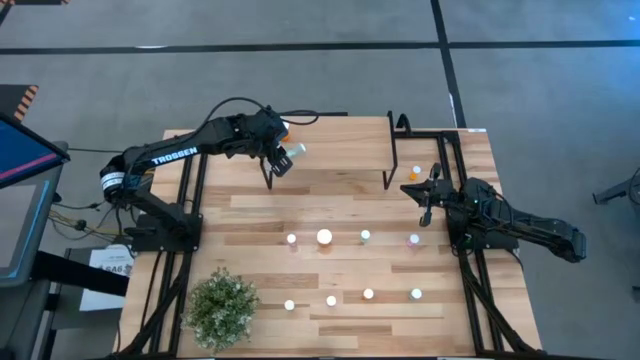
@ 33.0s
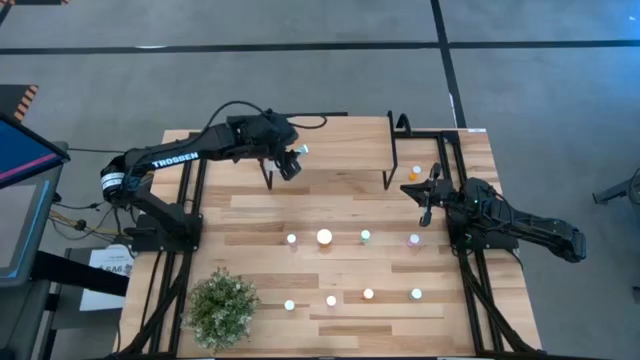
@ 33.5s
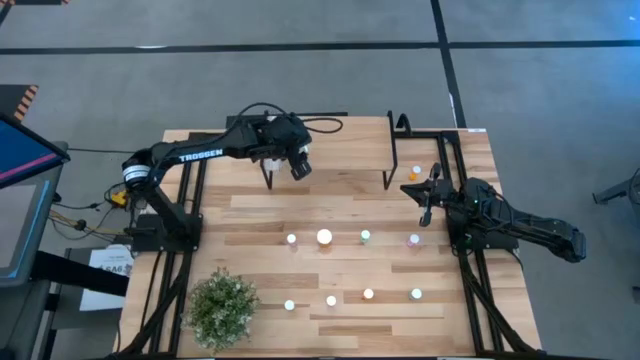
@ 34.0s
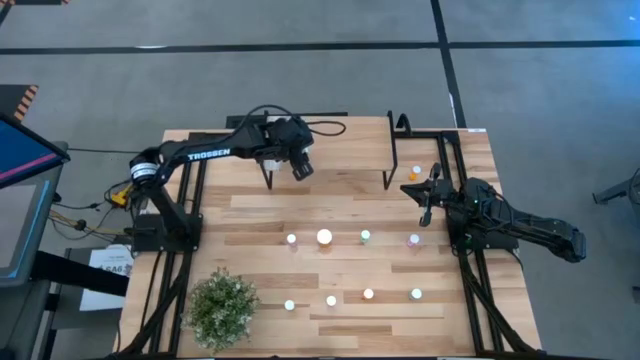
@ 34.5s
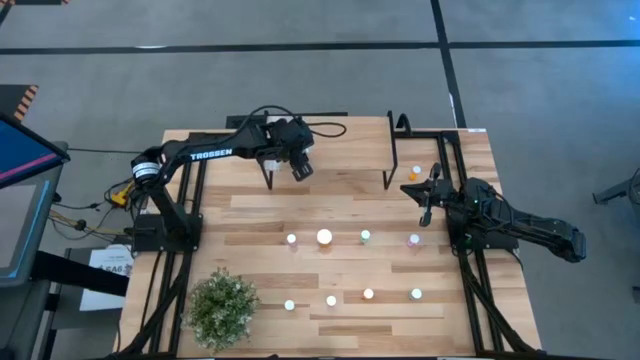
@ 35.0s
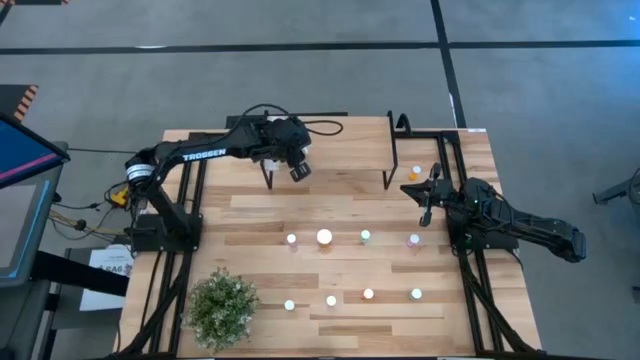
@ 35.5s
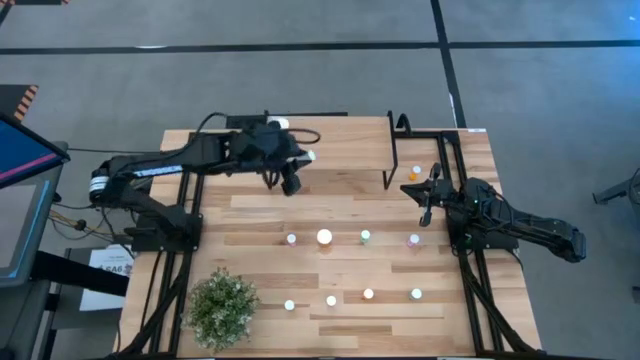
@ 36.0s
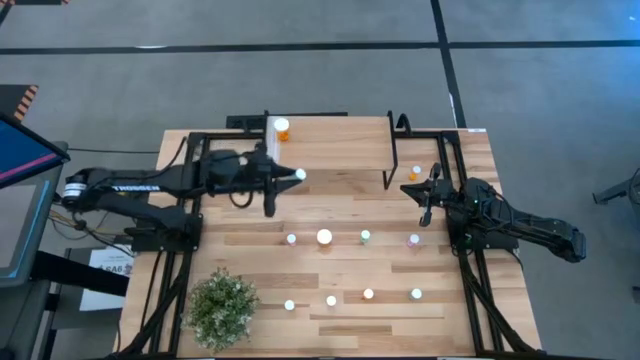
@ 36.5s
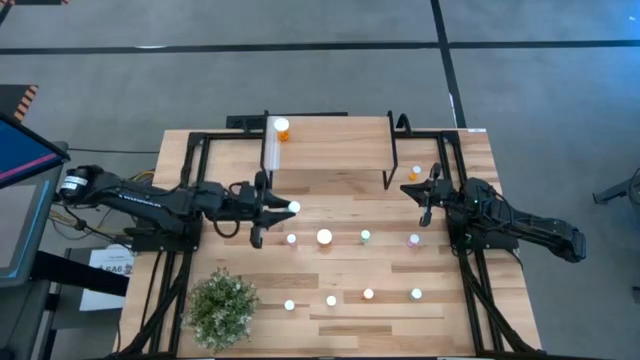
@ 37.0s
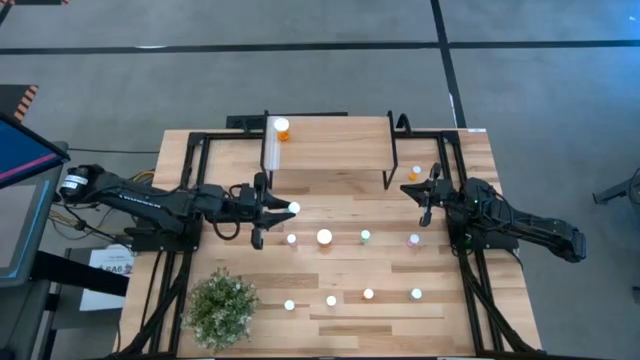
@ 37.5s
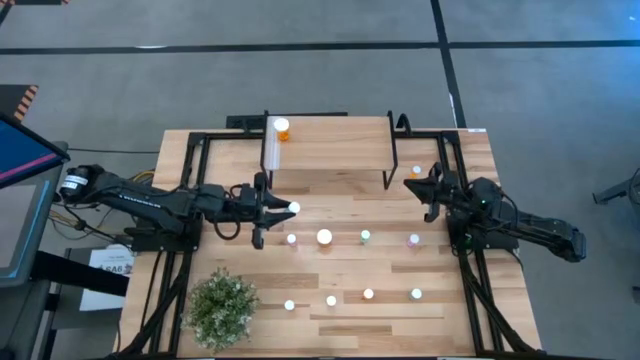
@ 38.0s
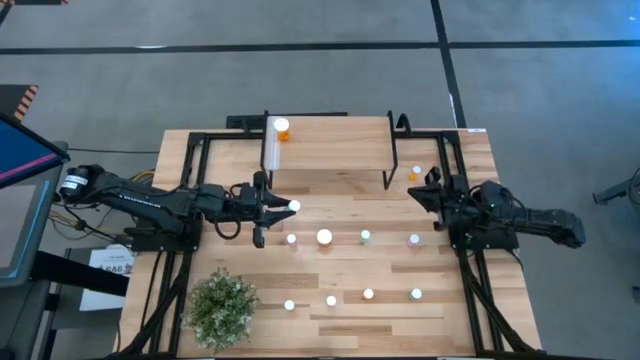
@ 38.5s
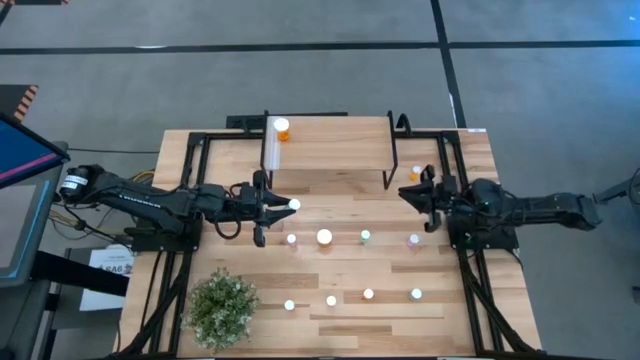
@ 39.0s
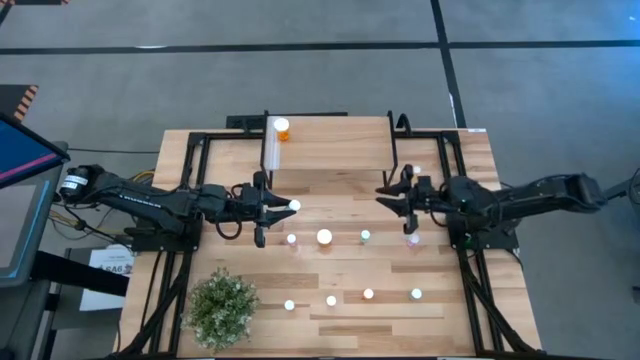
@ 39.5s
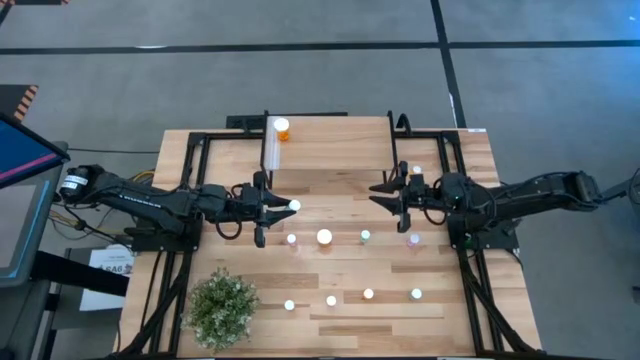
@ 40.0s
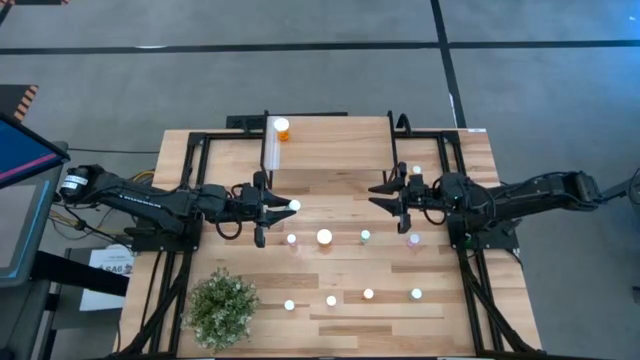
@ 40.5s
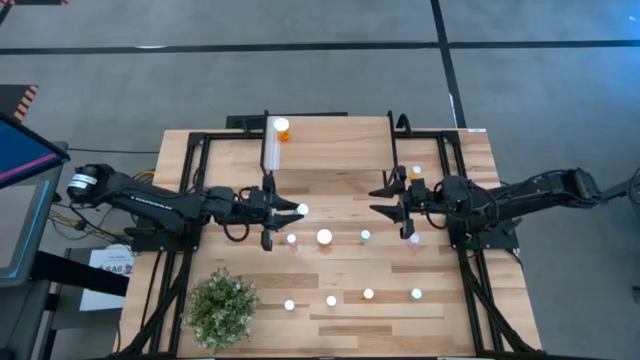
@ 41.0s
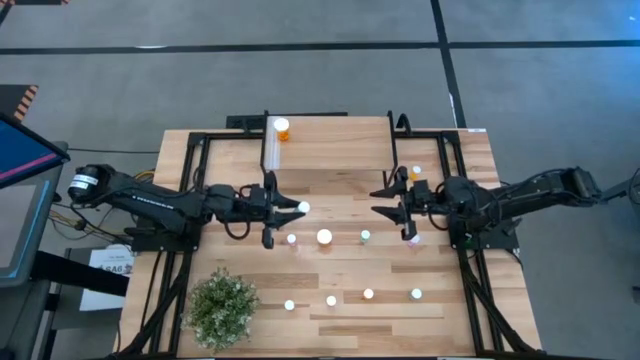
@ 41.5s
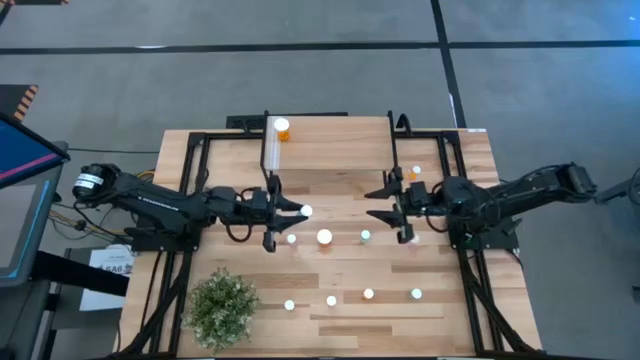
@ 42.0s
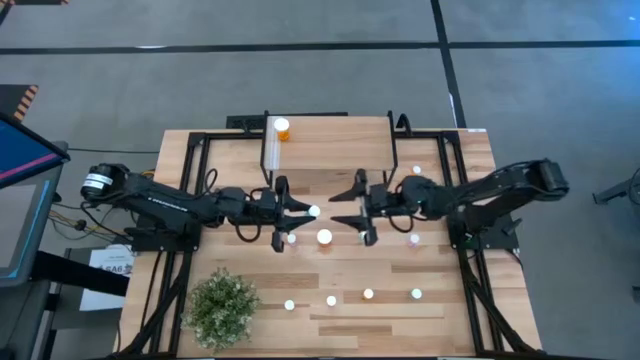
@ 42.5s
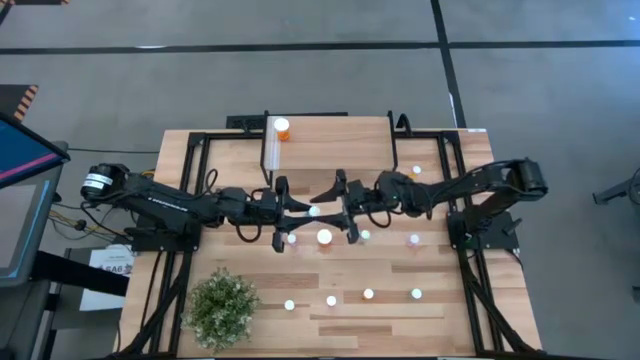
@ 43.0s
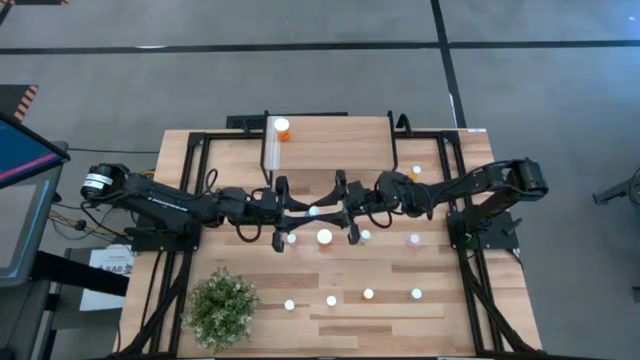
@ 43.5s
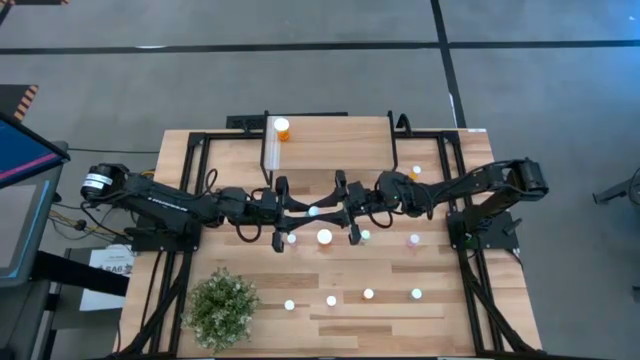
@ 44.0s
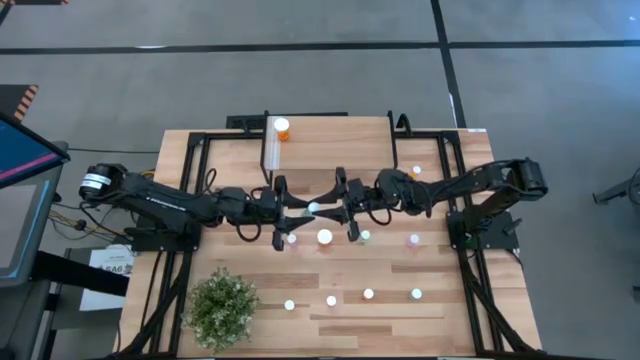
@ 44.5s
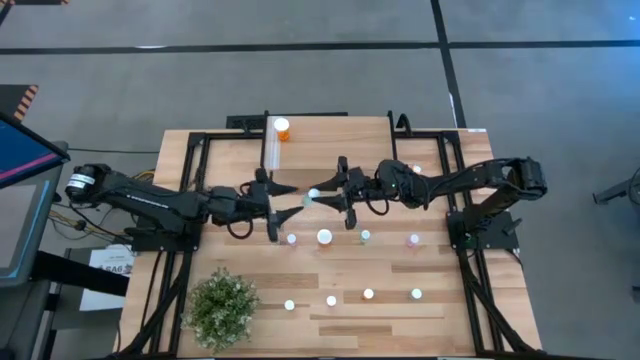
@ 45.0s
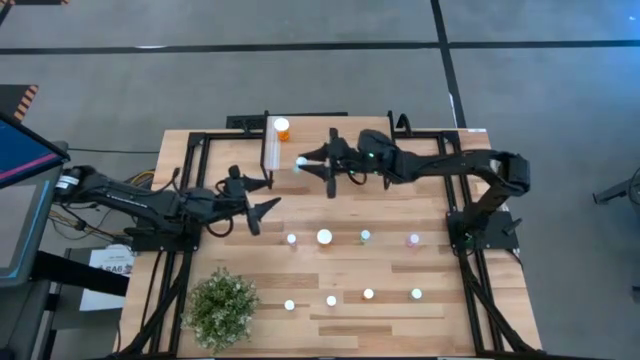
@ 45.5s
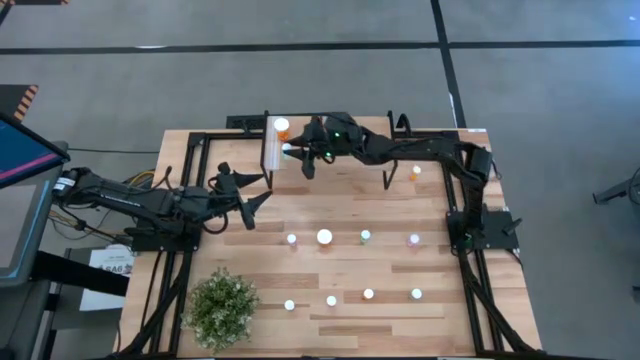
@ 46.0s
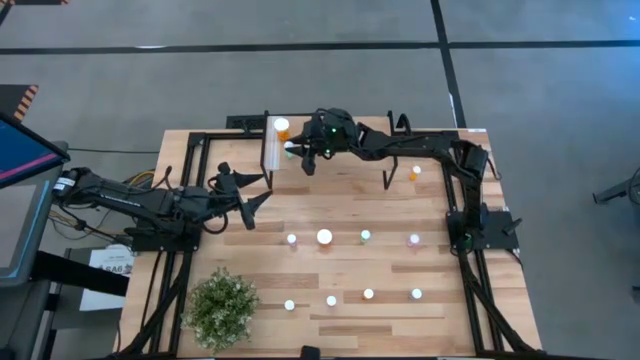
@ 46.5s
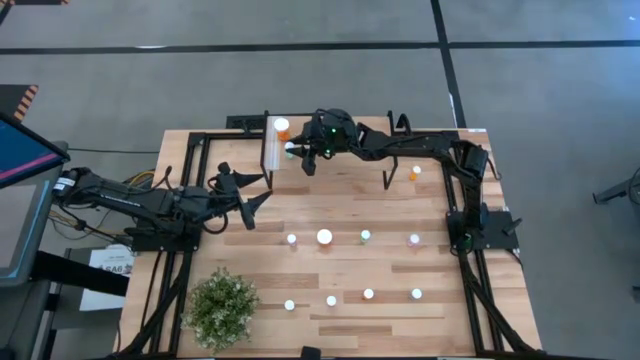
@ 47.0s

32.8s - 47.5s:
Task: Pick and place medicine bottles onto shelf by color
Put the blue pill bottle on the shelf

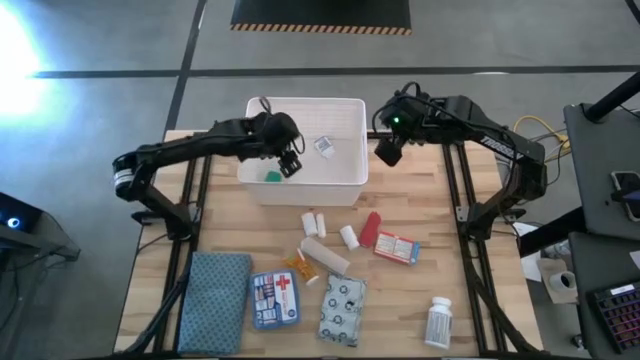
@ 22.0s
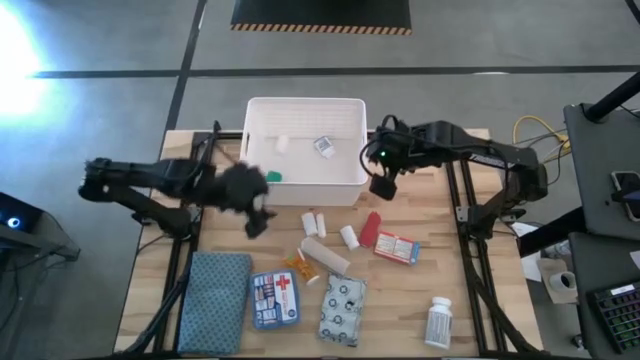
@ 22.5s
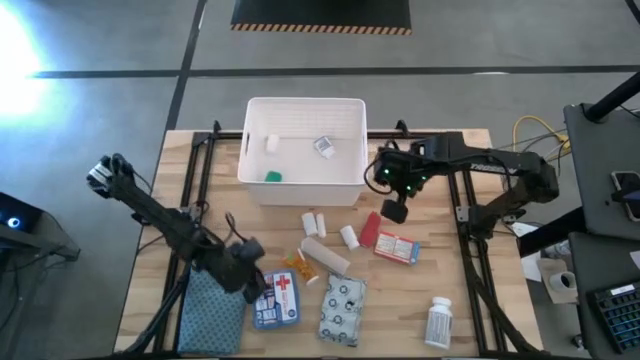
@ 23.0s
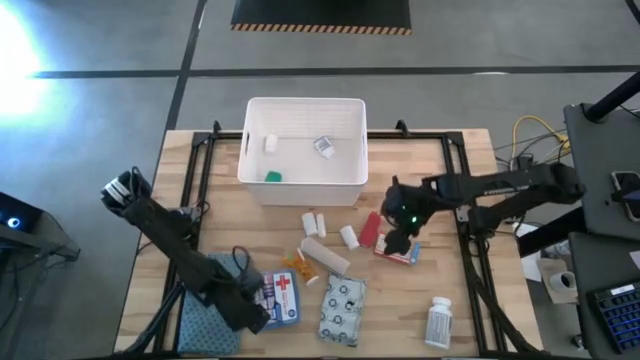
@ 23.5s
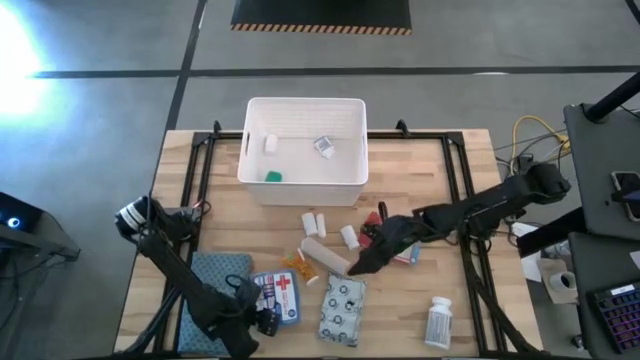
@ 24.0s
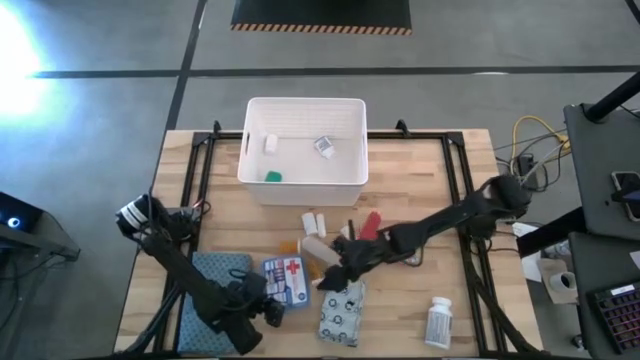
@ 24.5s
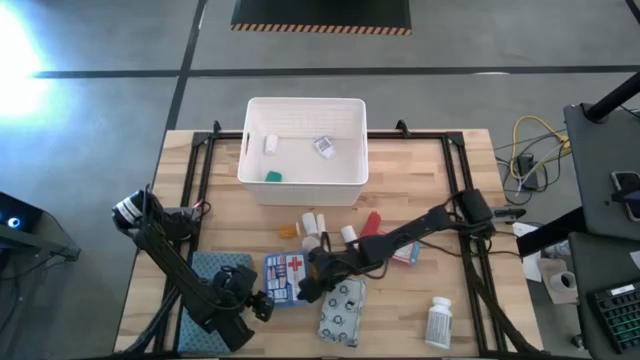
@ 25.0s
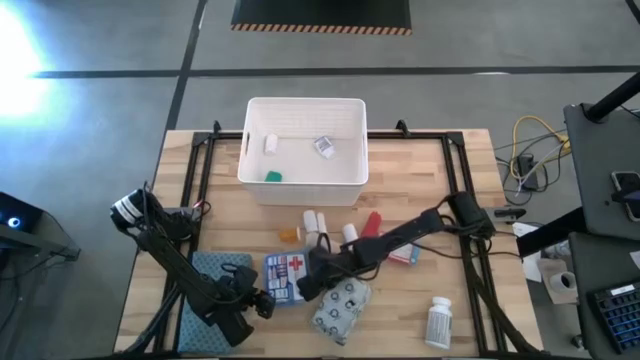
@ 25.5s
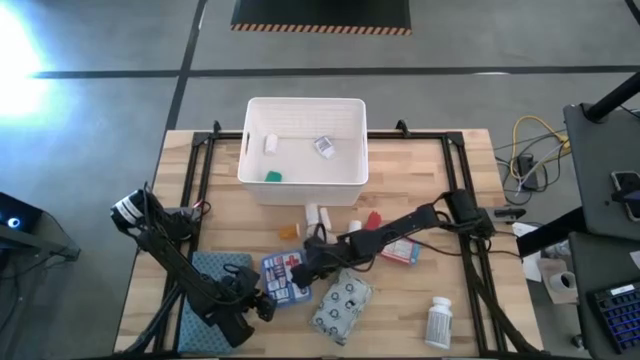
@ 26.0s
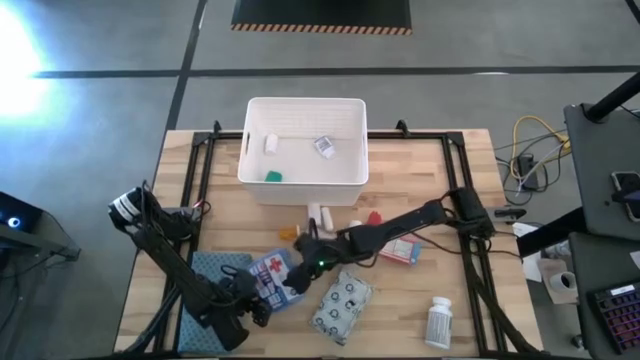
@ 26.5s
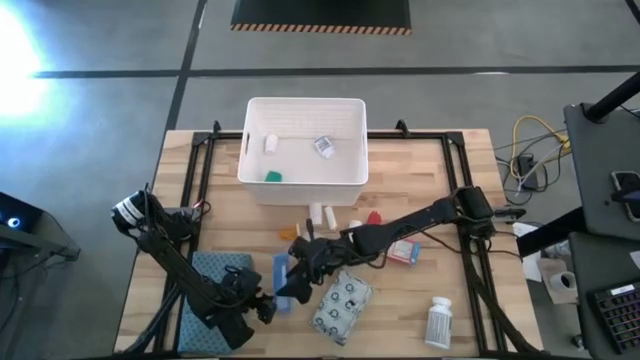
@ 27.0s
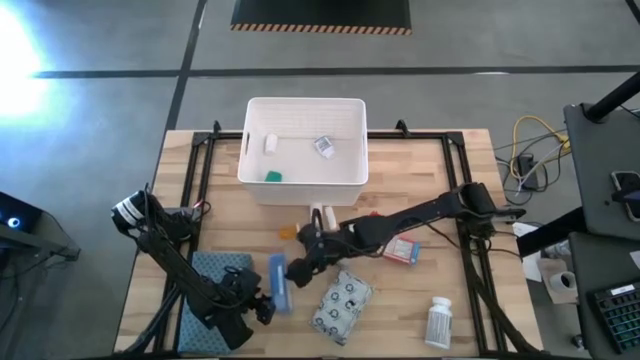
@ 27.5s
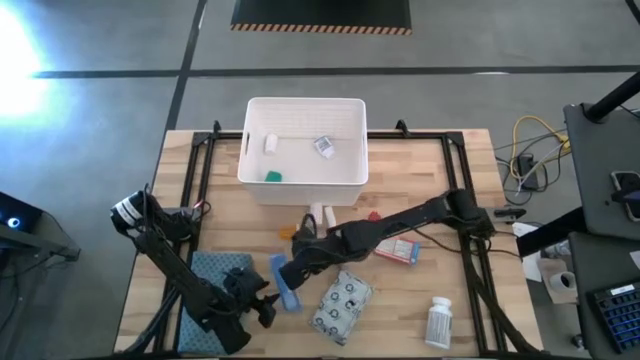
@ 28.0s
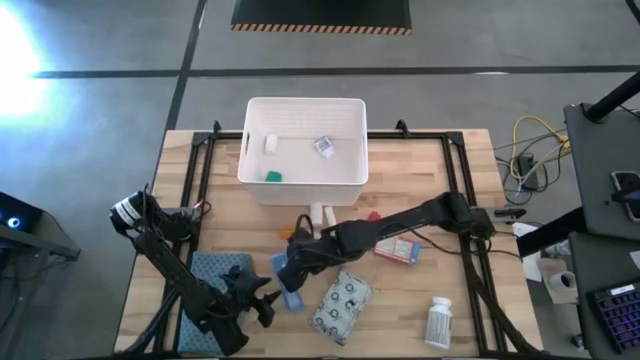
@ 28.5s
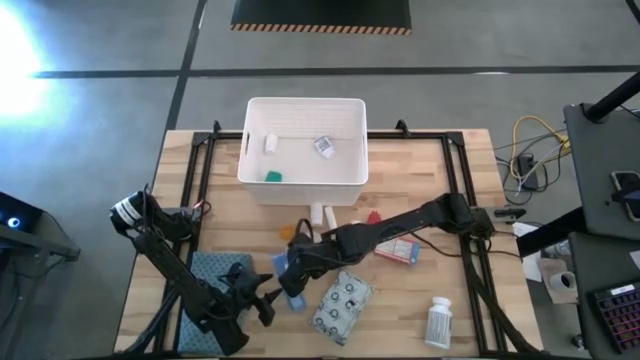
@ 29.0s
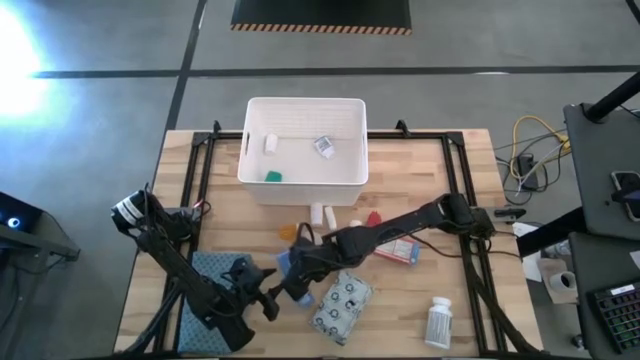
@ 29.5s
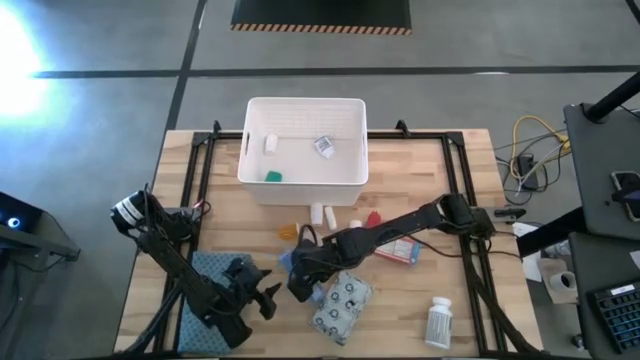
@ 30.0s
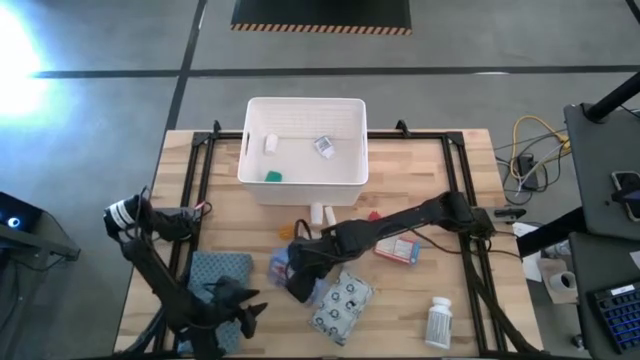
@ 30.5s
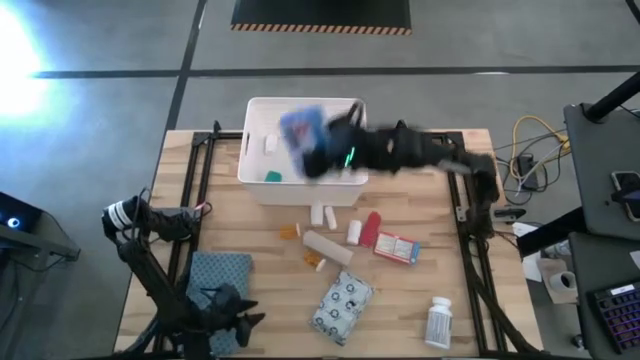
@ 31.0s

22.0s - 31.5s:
Task: Pick & place medical supplies in basket/bin
Put the first aid box into the white bin
